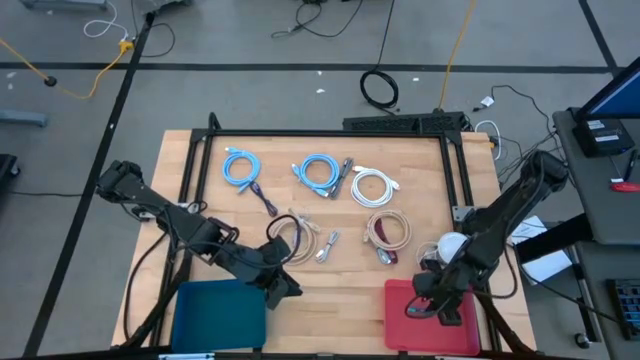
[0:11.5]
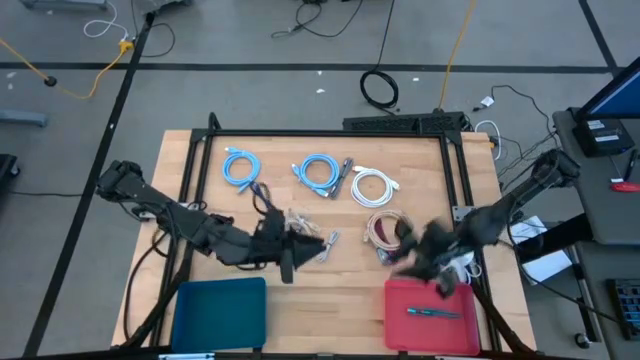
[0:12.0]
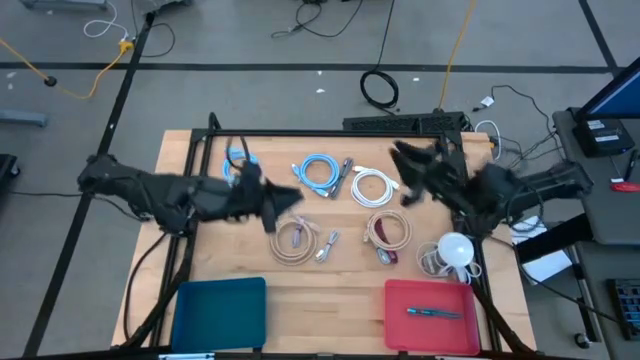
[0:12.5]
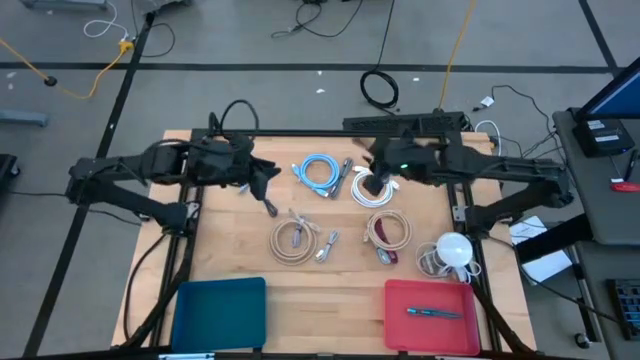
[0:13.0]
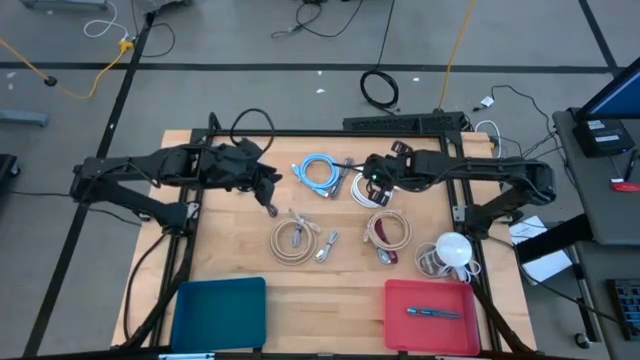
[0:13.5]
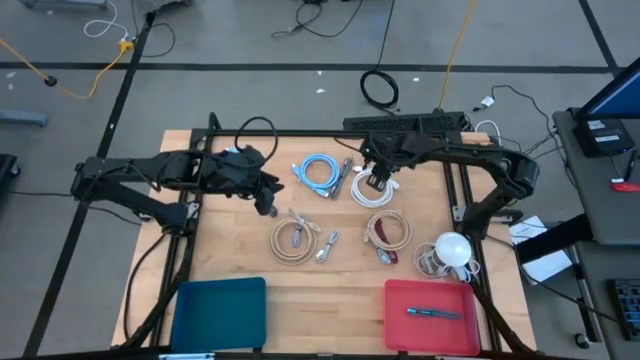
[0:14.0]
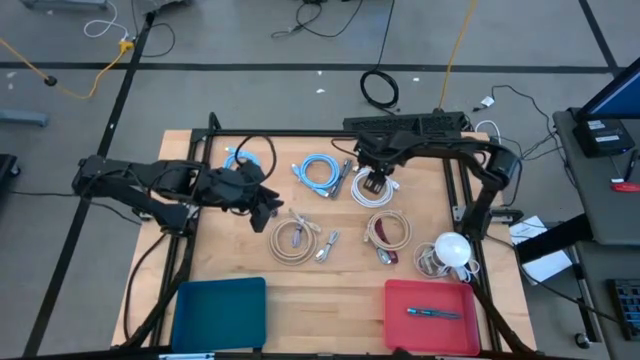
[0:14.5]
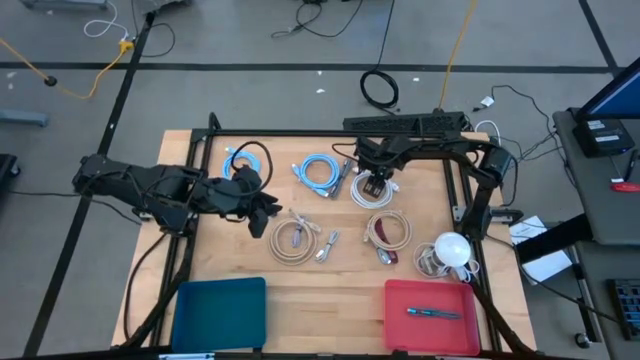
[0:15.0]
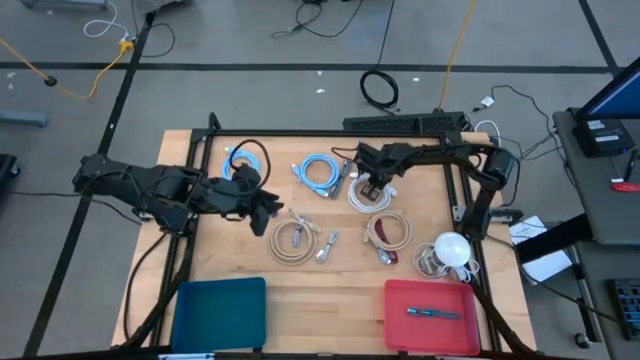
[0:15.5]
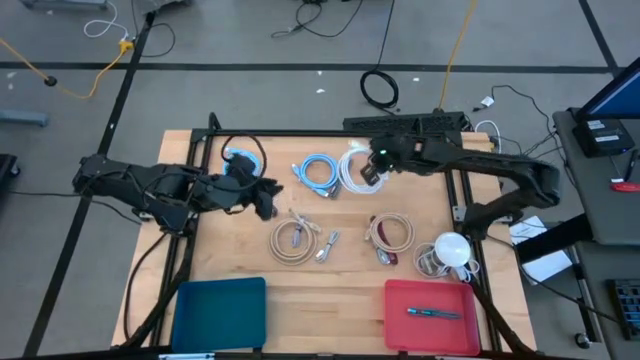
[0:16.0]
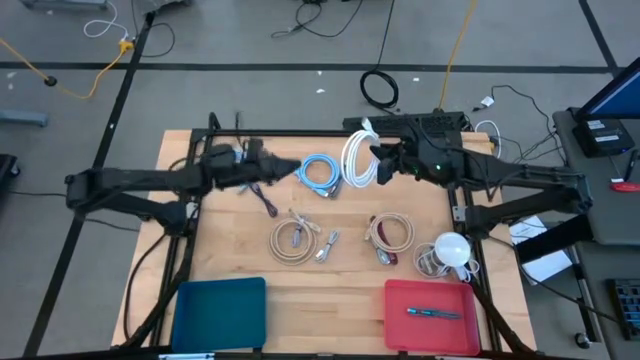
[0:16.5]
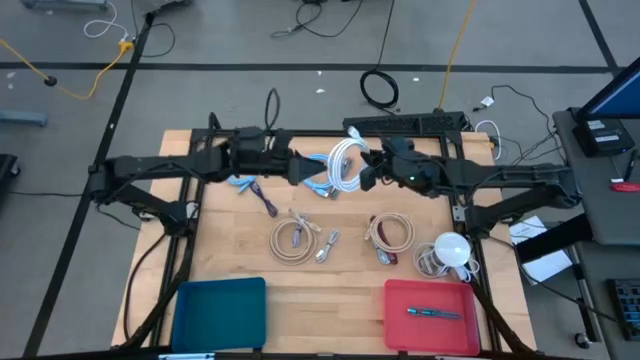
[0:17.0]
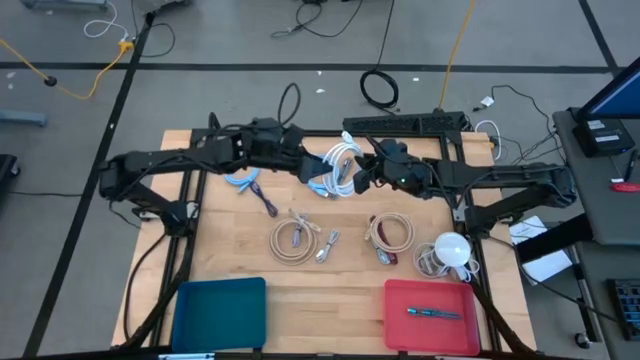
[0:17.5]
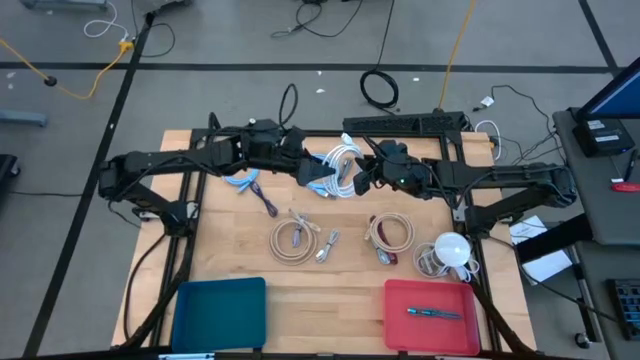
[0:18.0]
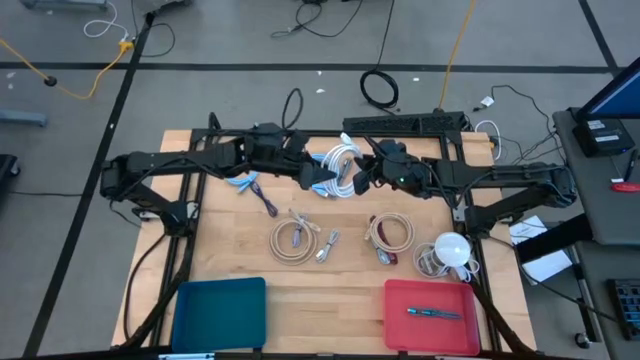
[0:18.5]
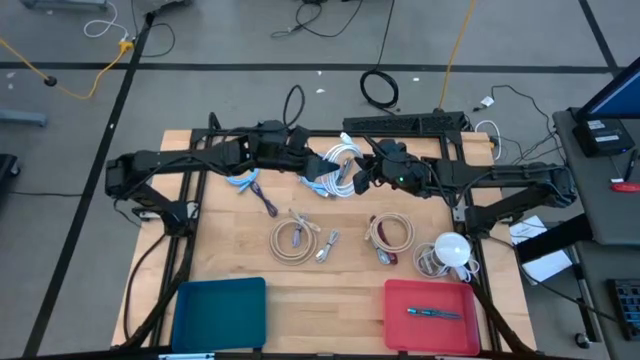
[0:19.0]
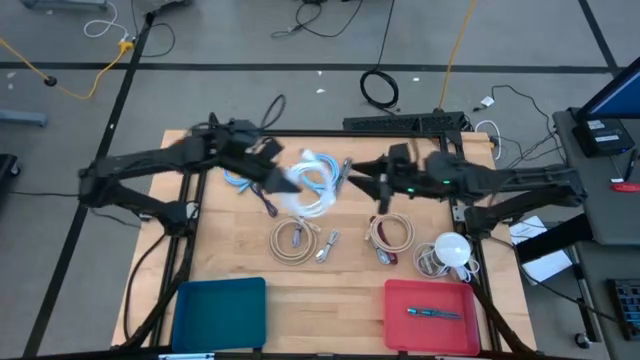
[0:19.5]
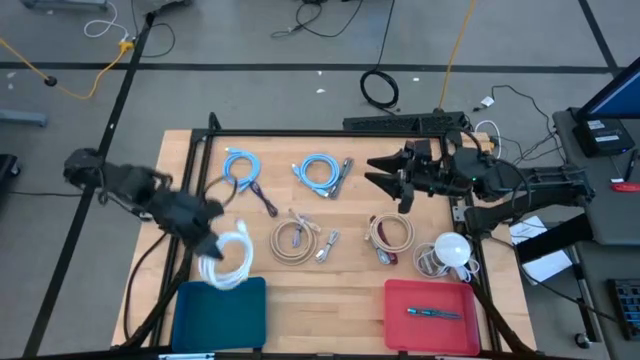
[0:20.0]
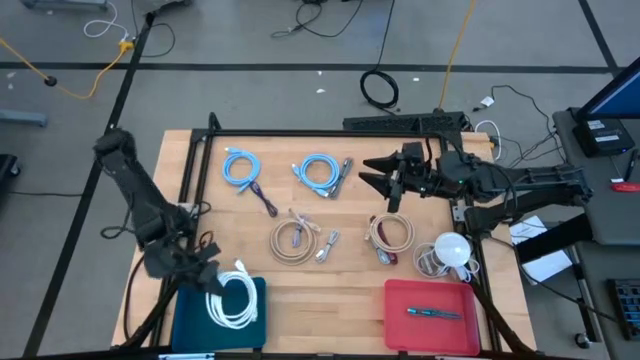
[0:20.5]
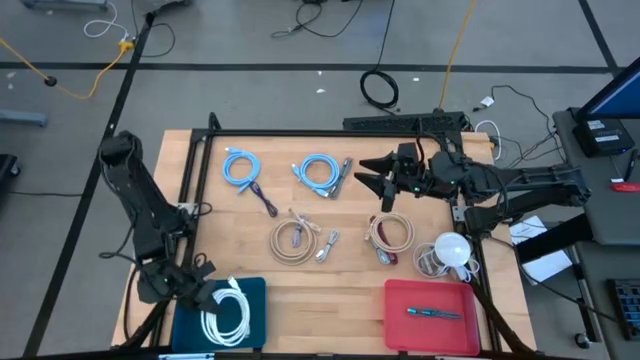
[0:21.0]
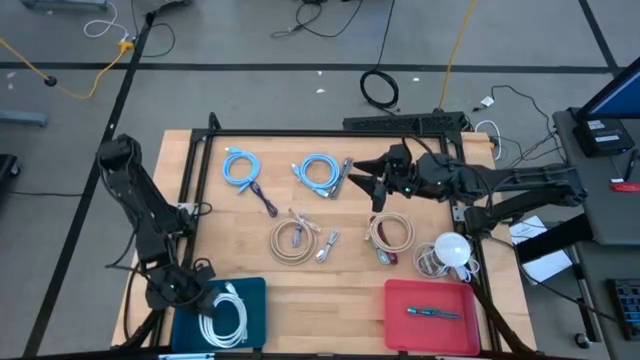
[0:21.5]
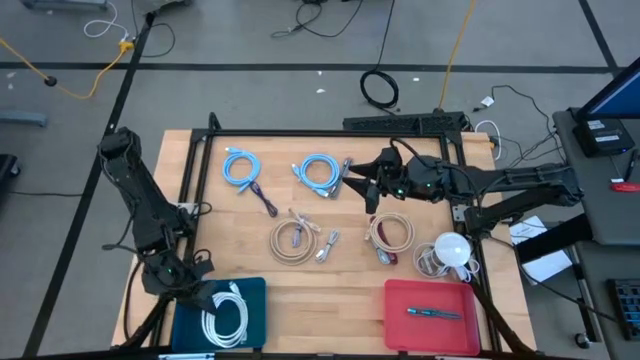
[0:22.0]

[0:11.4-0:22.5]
Task: Pick & Place USB Port
Put the white HDMI cable into the blue bin

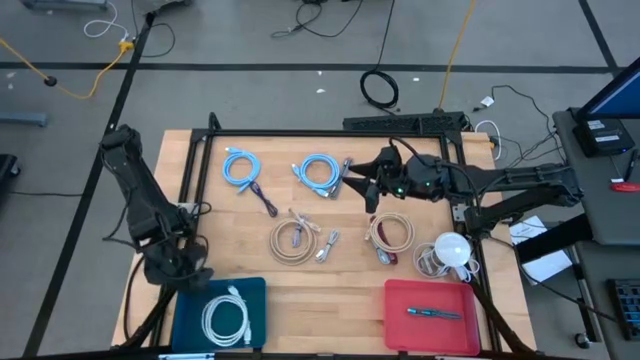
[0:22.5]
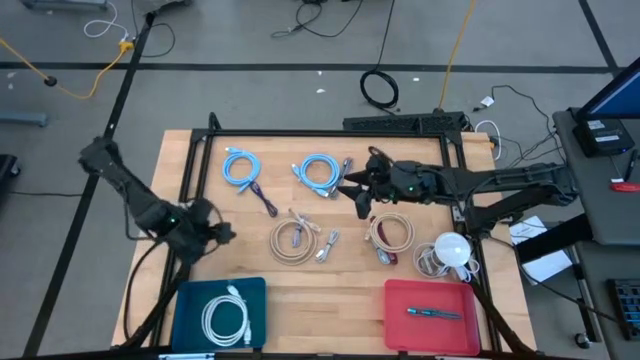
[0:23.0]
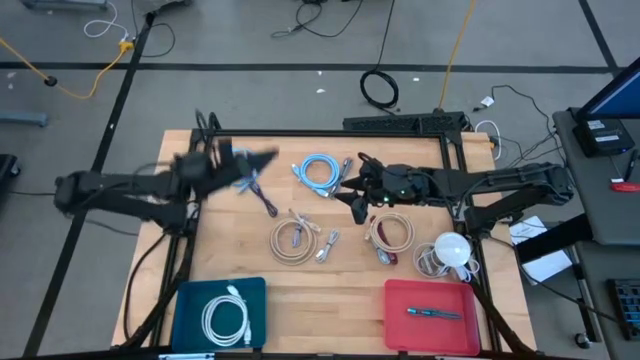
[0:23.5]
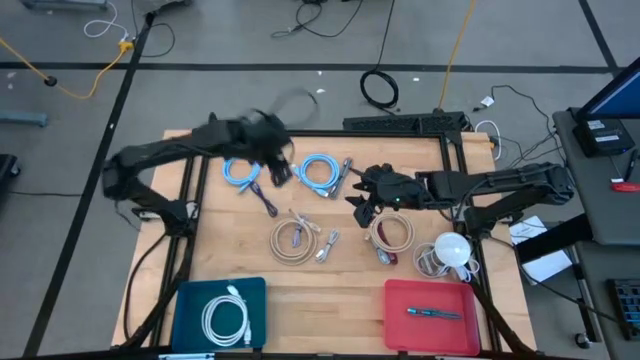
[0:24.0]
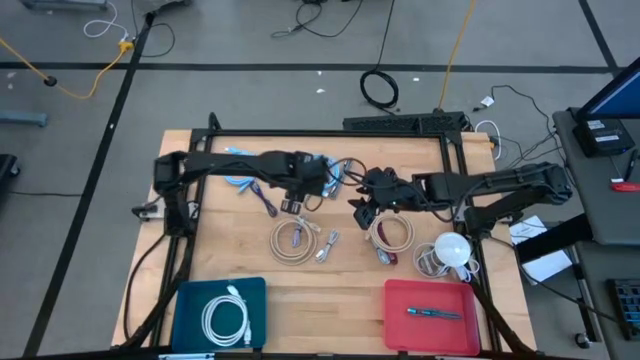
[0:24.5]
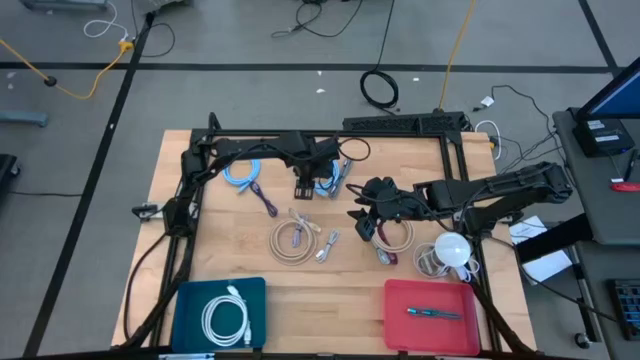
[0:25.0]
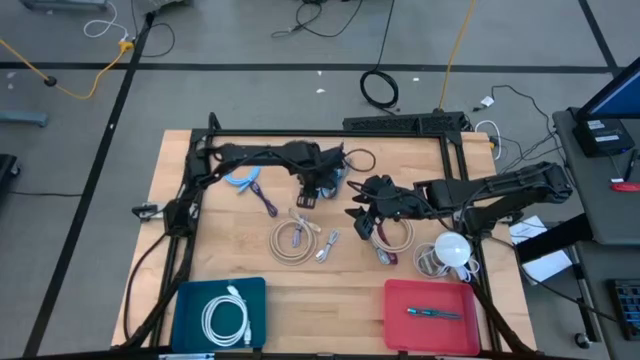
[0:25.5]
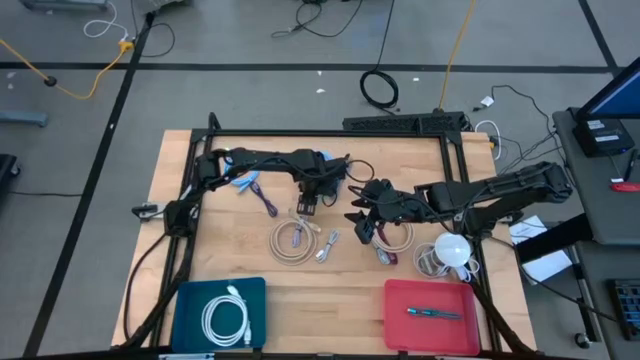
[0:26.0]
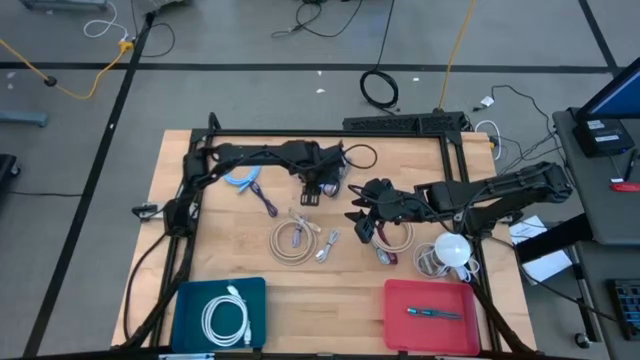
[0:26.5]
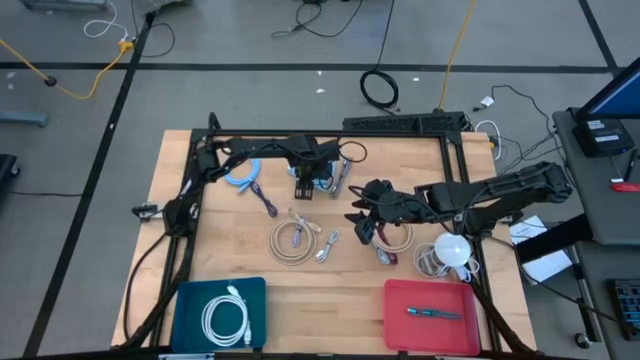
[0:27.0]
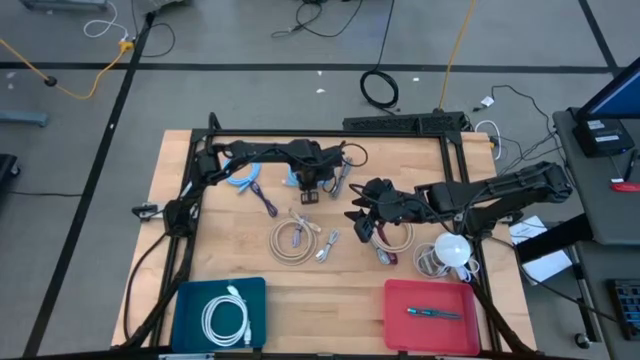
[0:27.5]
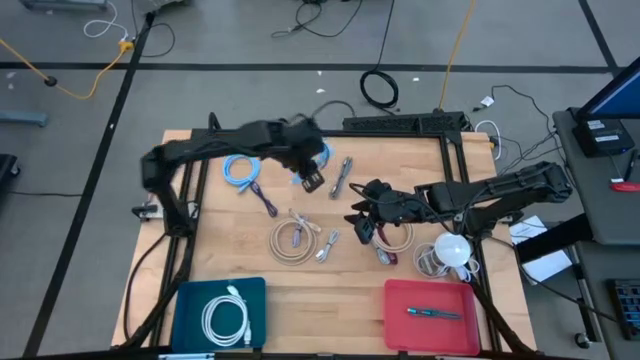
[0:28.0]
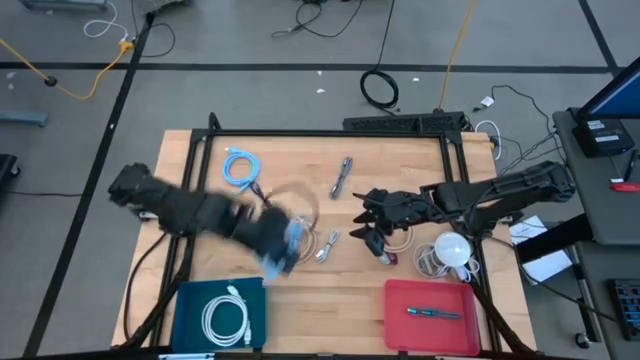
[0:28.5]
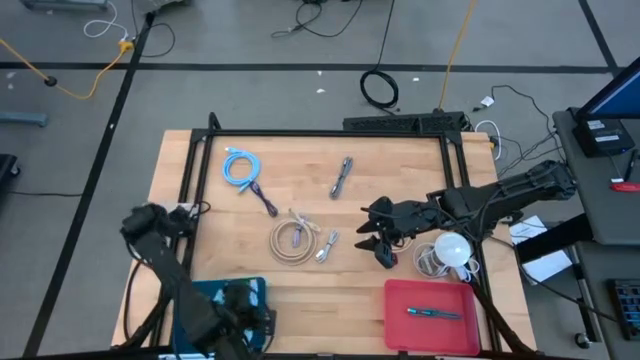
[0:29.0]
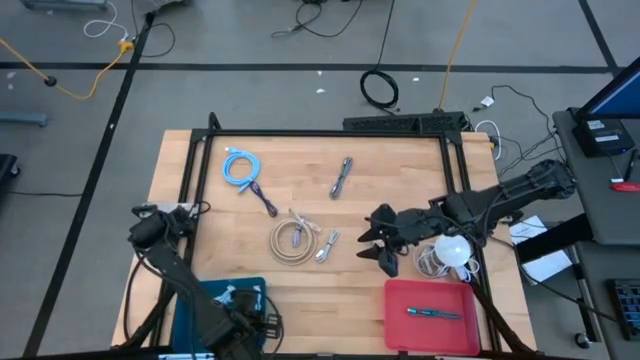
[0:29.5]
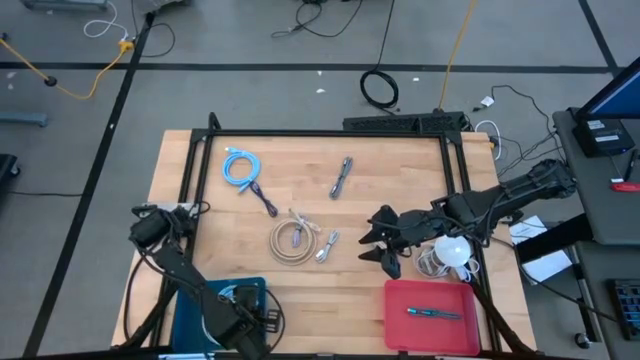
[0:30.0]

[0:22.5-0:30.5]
Put the right blue HDMI cable into the blue bin
